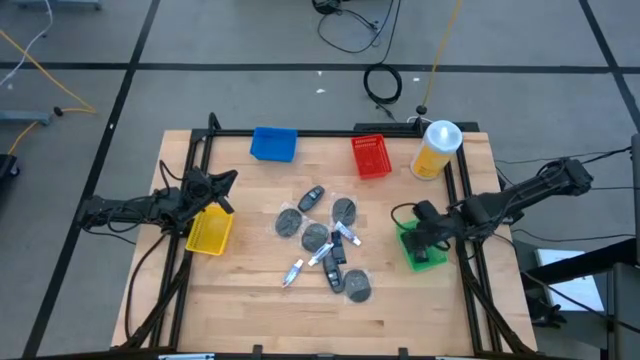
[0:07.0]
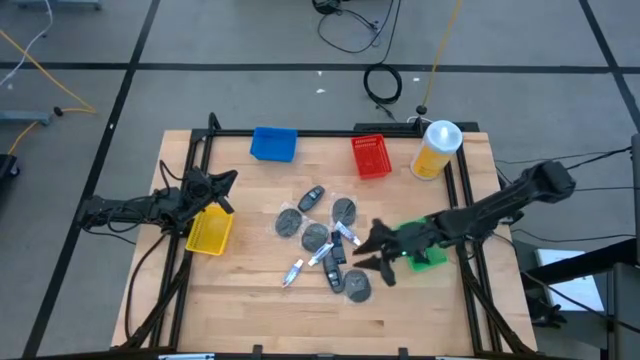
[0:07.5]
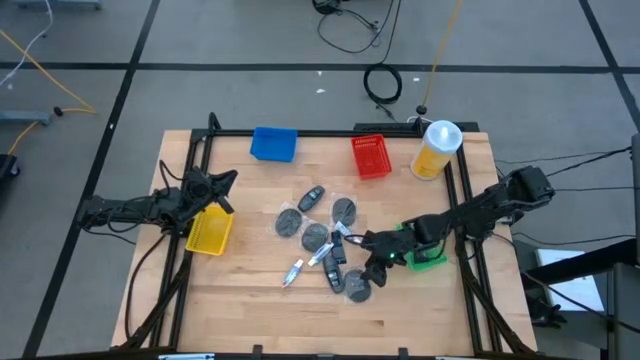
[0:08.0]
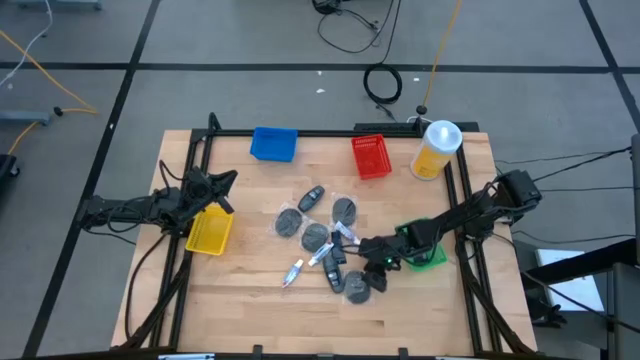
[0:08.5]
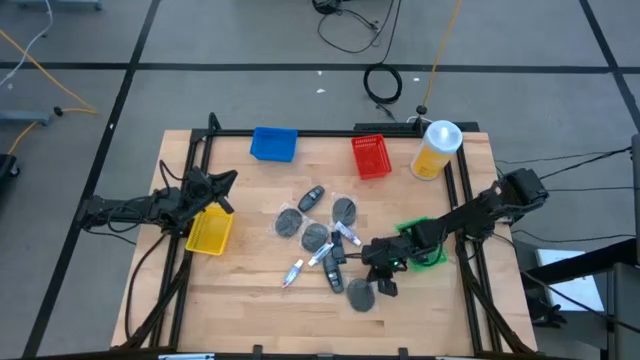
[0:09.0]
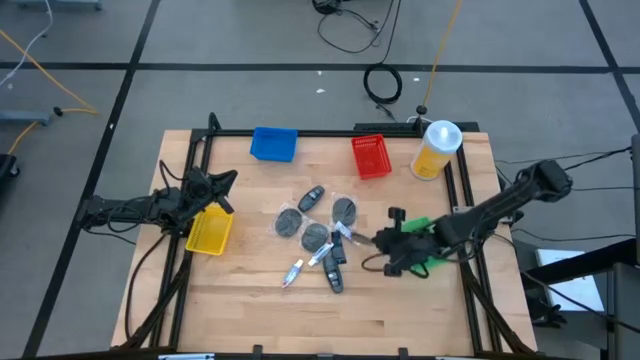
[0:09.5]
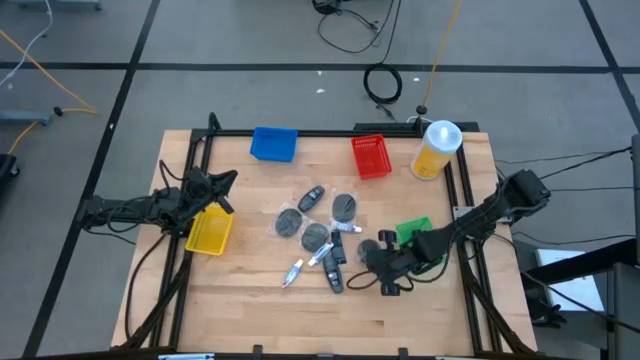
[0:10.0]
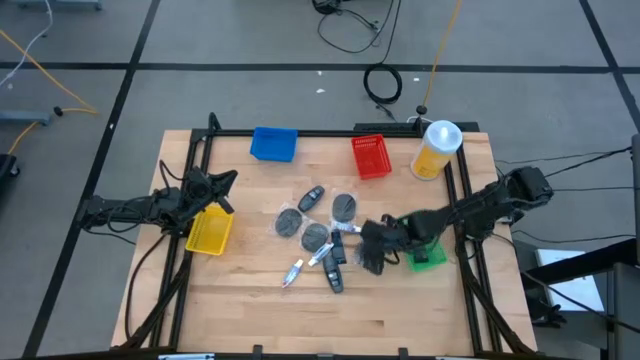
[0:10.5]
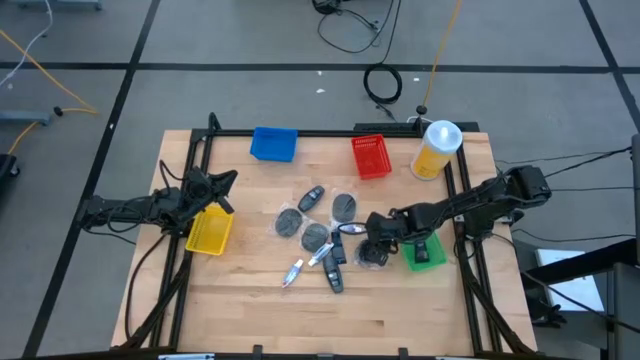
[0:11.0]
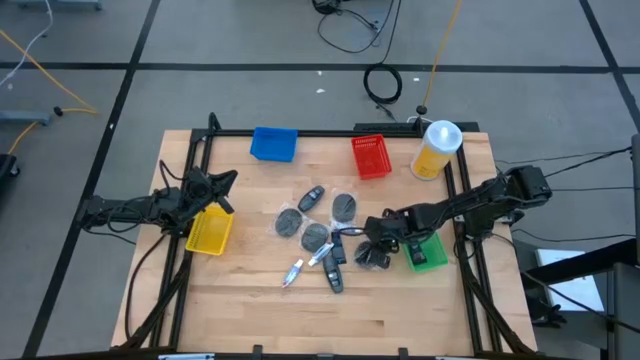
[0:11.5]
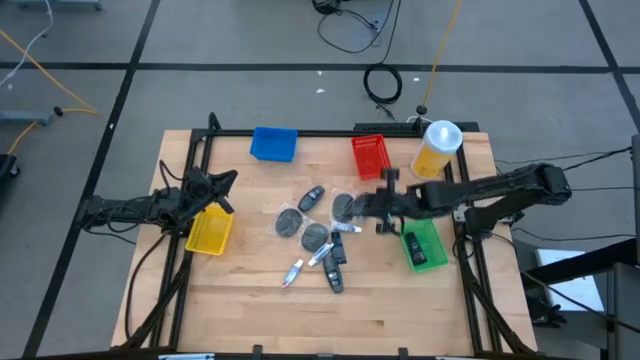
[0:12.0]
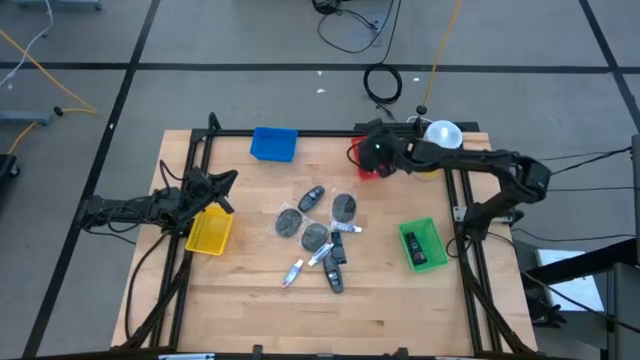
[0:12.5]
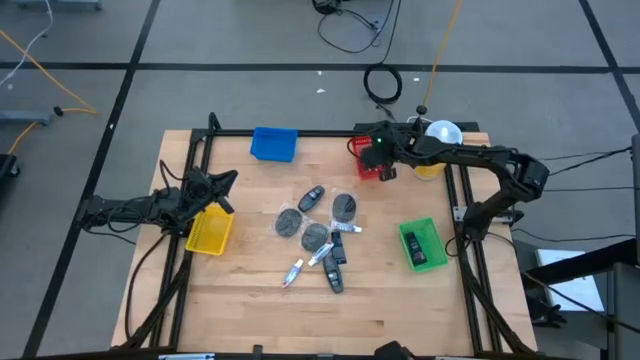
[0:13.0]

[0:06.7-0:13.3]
Task: Pick & Place Travel size toiletries
Put the black hairbrush into the yellow bin

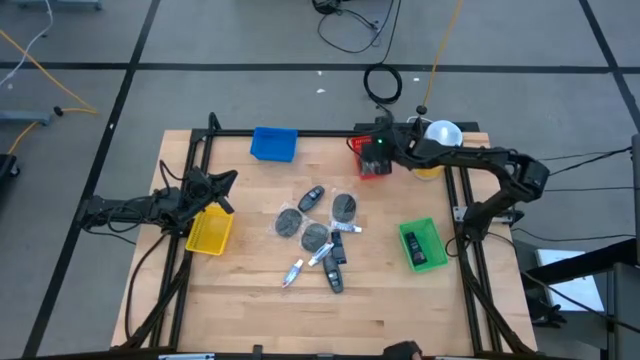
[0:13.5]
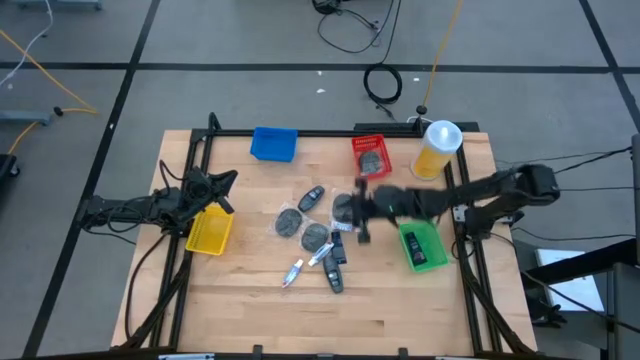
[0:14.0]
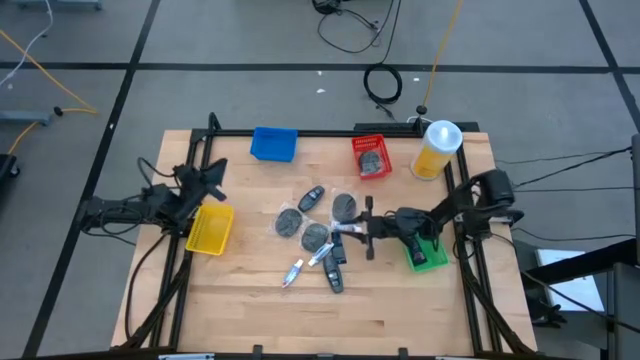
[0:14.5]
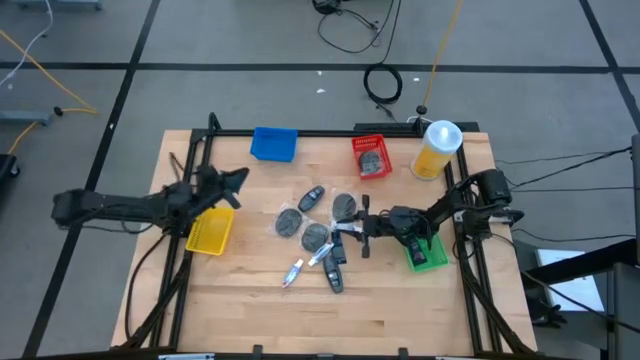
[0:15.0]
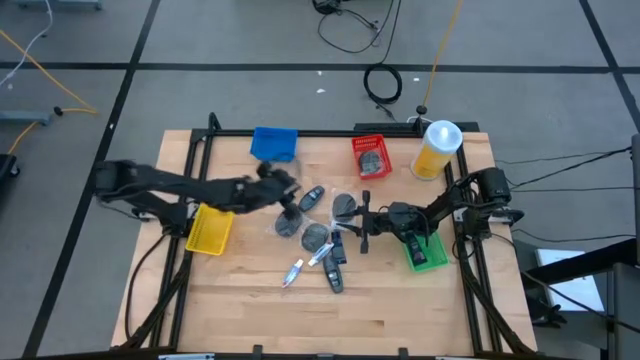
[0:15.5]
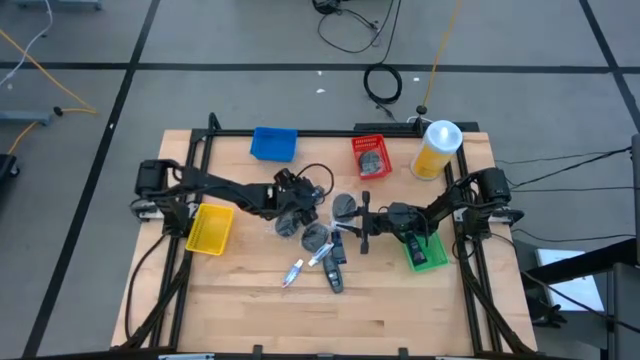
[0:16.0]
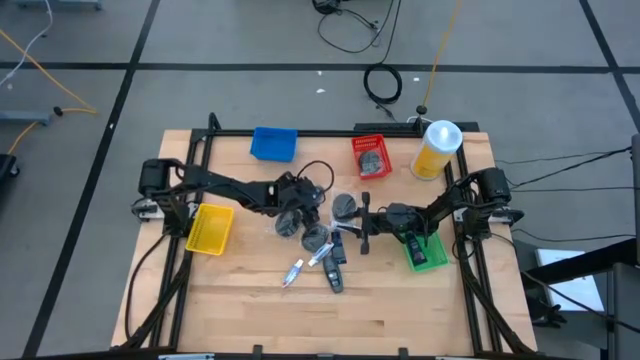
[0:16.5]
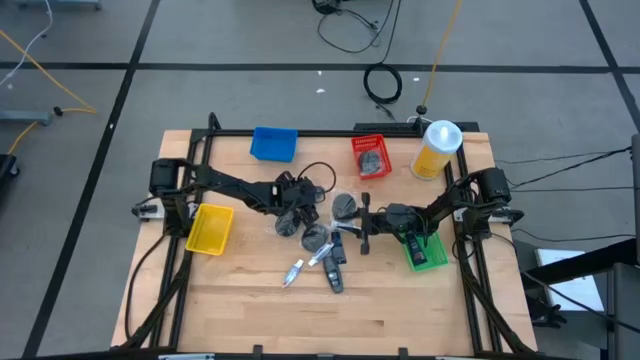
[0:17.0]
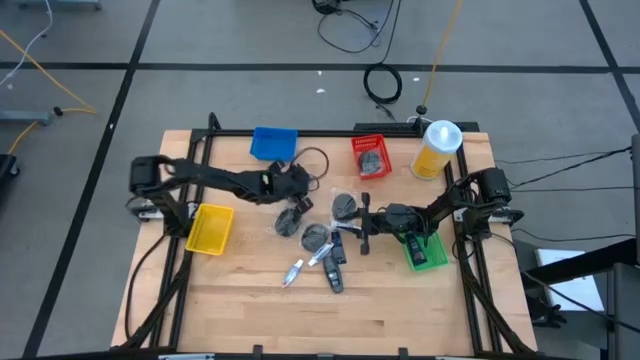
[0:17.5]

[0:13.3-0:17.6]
Put the gray deodorant into the blue bin

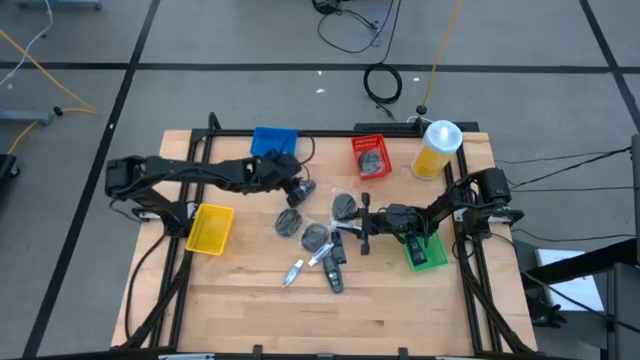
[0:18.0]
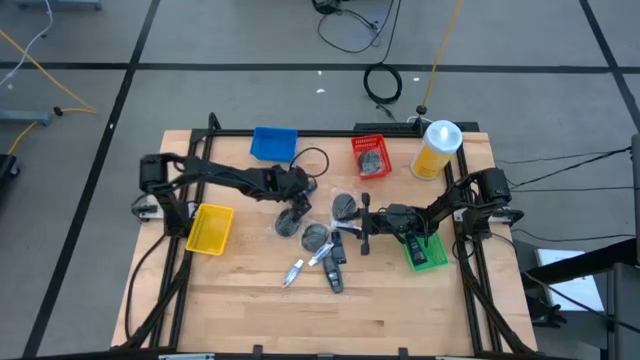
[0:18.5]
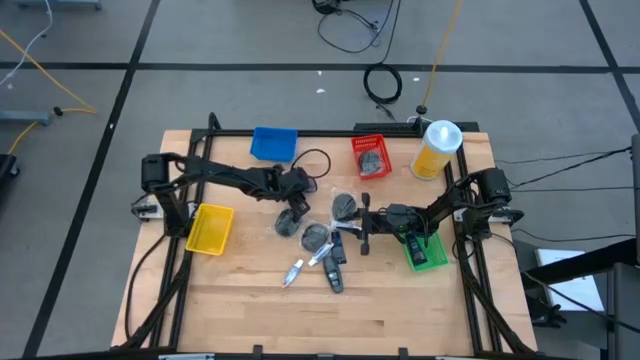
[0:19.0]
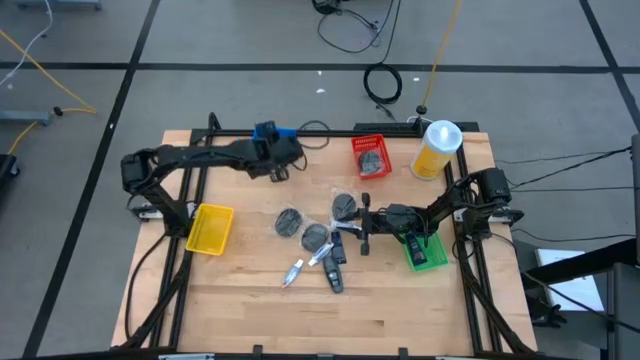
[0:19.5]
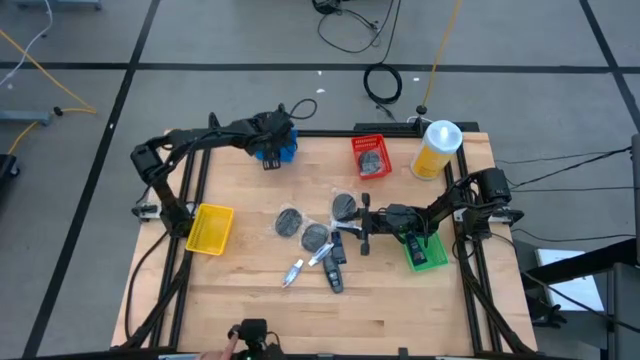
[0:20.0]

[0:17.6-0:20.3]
Put the gray deodorant into the blue bin

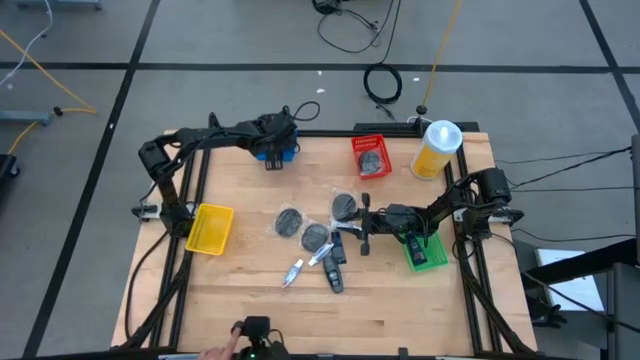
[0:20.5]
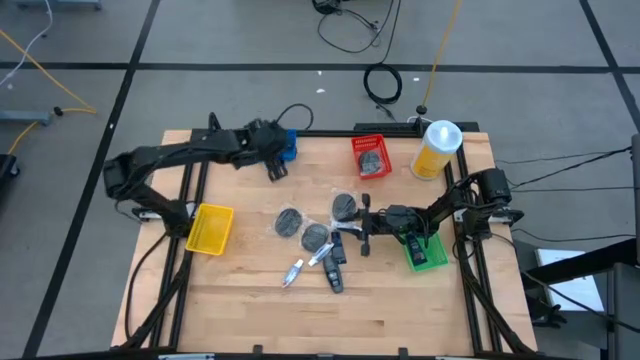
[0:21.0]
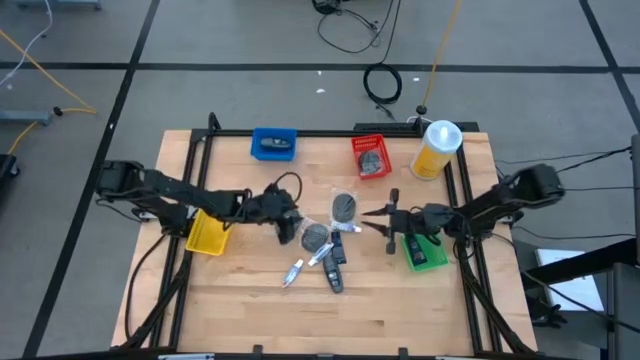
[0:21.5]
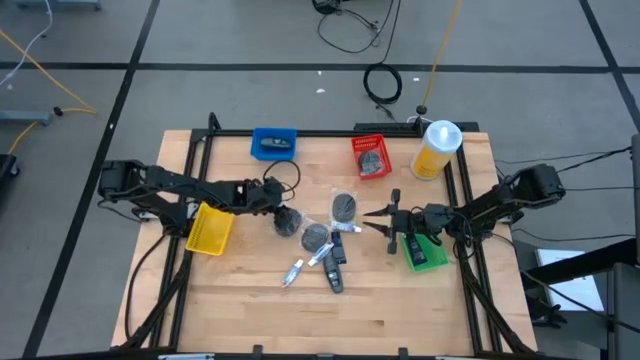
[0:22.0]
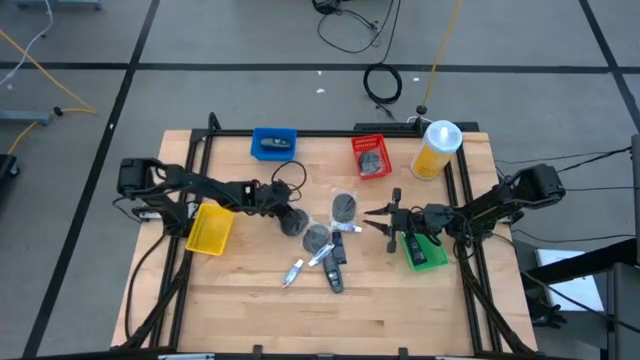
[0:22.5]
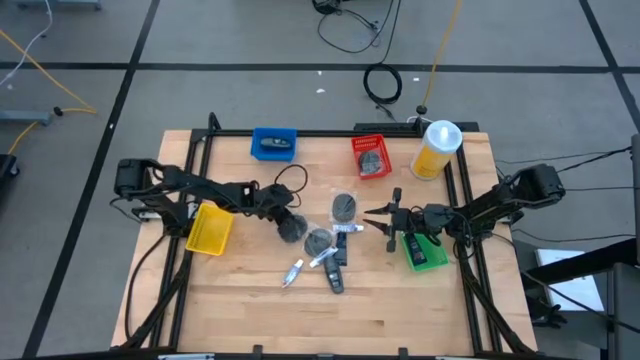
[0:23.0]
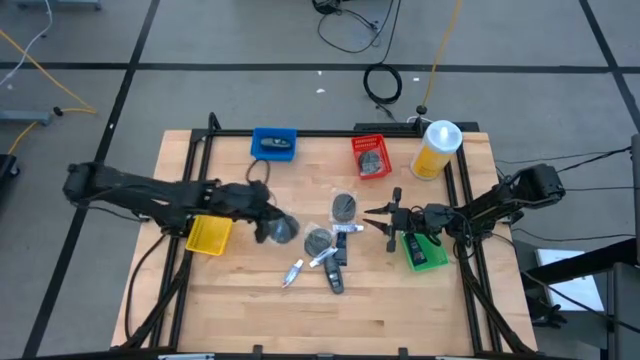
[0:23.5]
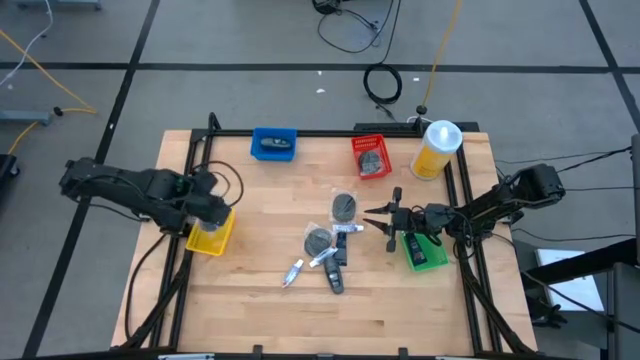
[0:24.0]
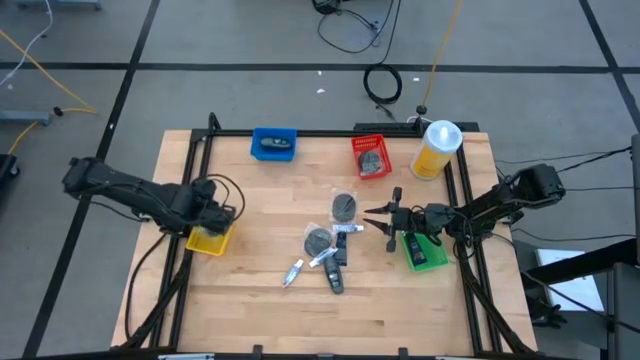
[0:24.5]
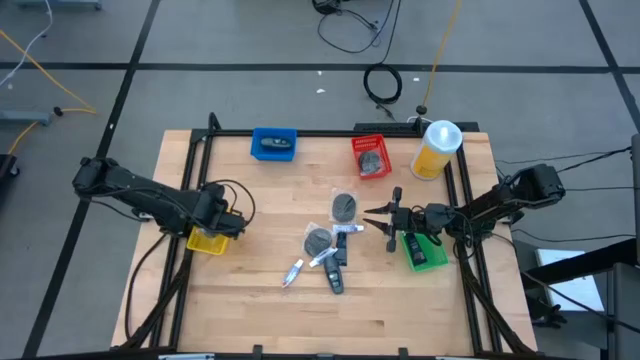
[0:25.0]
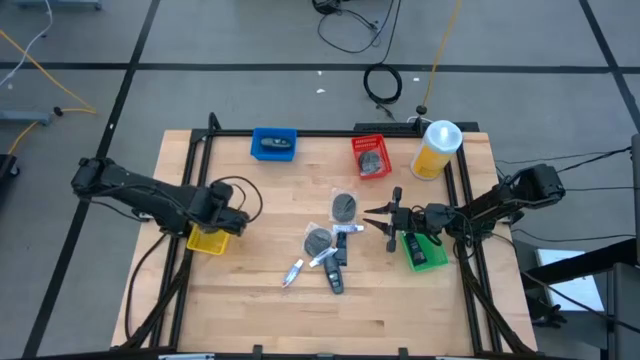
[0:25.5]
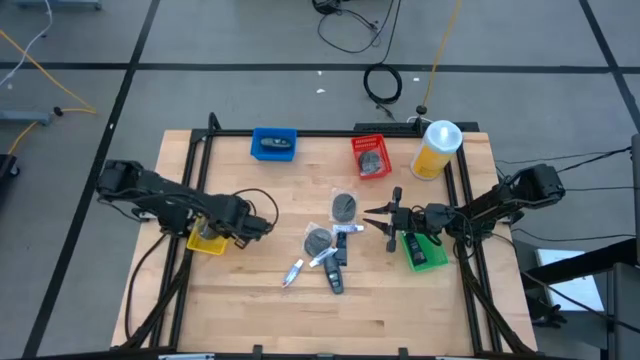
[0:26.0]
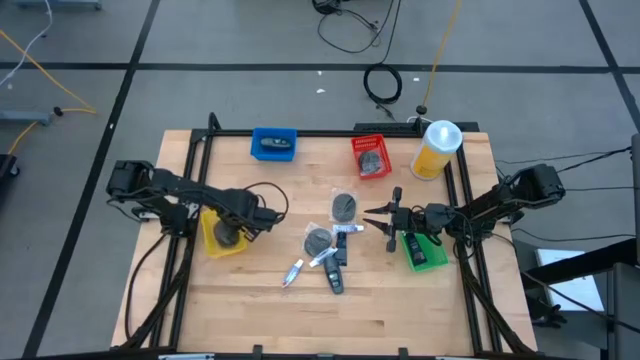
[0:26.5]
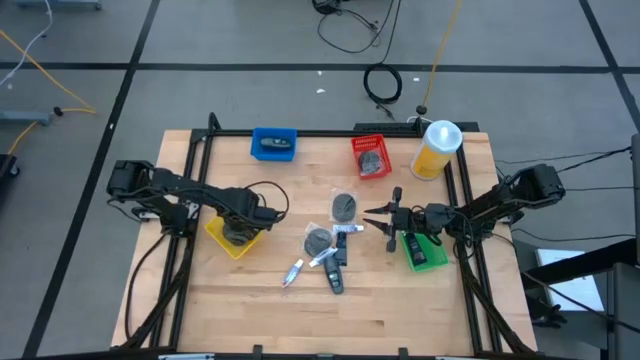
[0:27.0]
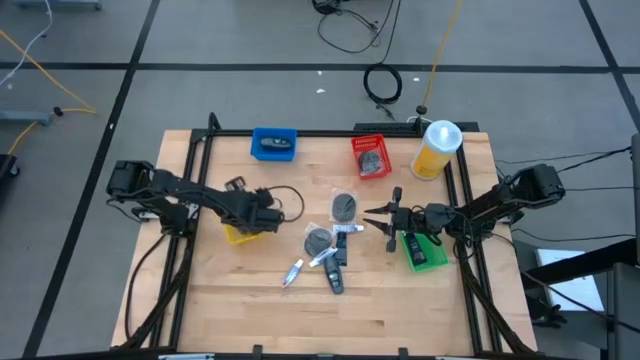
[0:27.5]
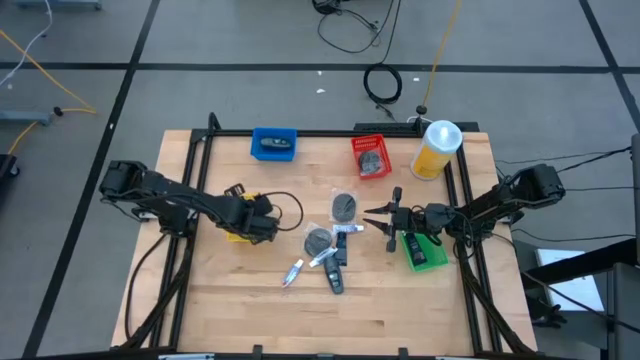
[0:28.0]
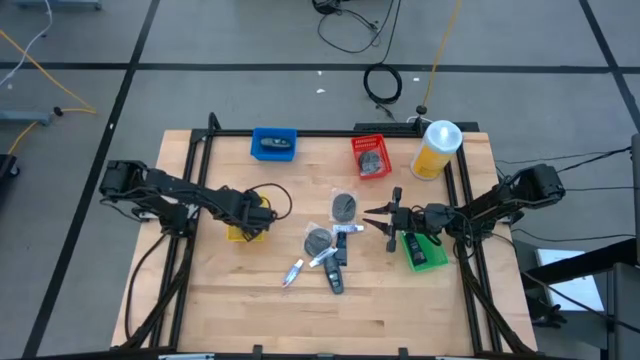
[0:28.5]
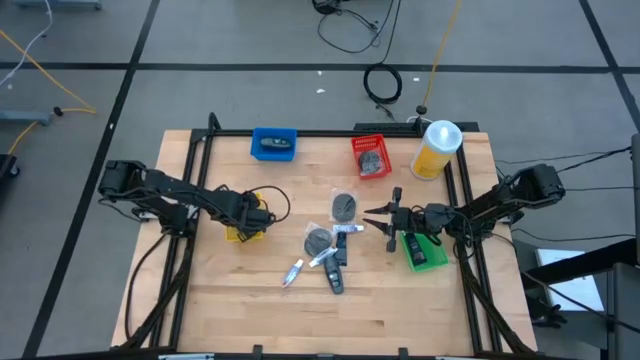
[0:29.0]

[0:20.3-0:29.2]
Put the black hairbrush into the yellow bin
